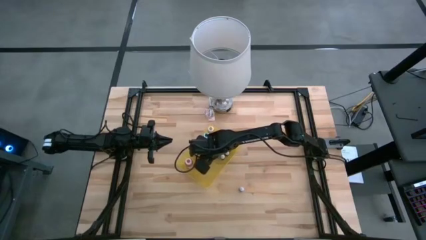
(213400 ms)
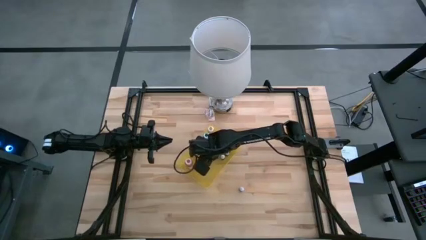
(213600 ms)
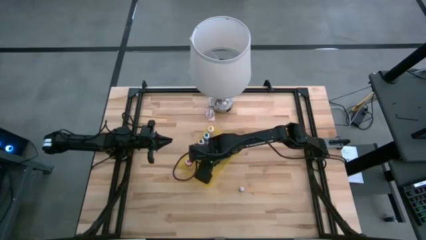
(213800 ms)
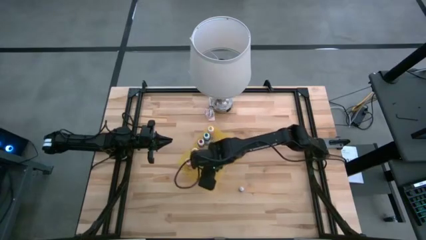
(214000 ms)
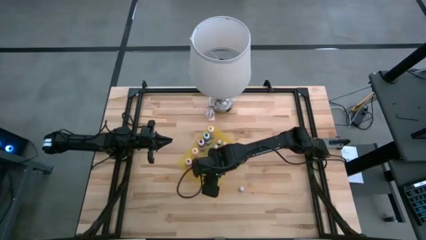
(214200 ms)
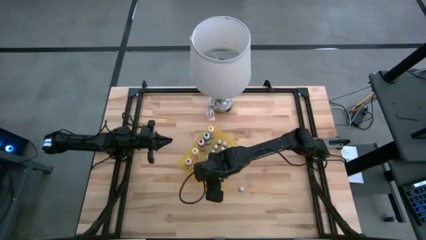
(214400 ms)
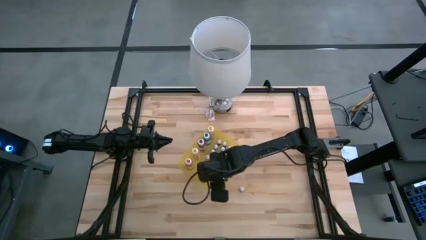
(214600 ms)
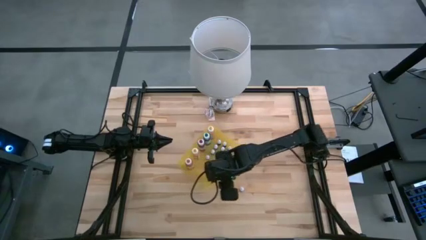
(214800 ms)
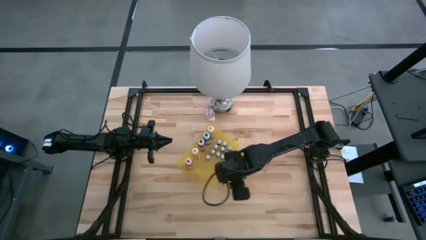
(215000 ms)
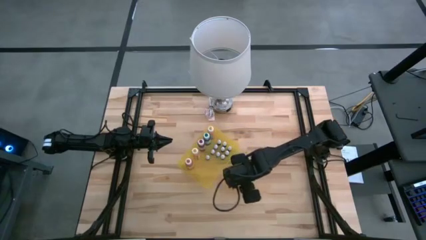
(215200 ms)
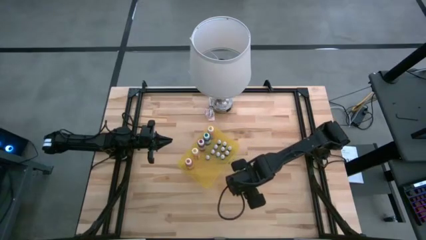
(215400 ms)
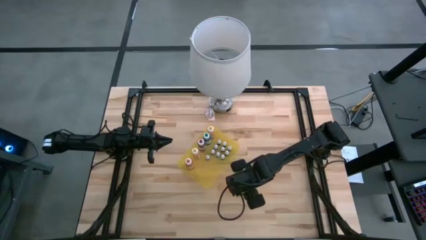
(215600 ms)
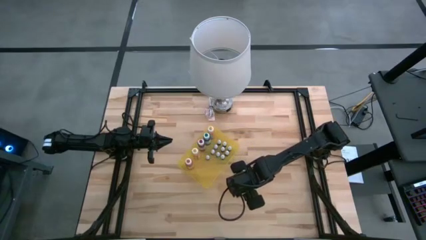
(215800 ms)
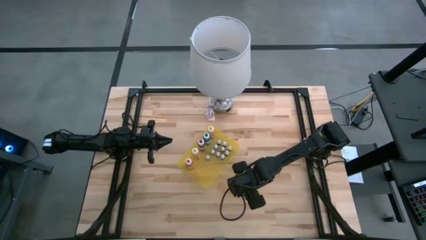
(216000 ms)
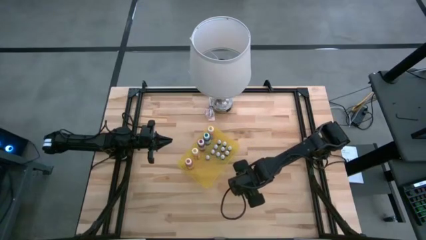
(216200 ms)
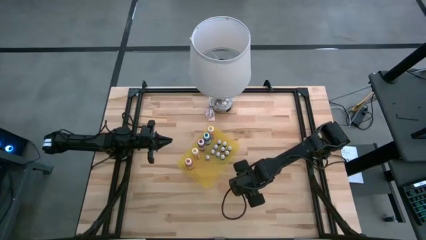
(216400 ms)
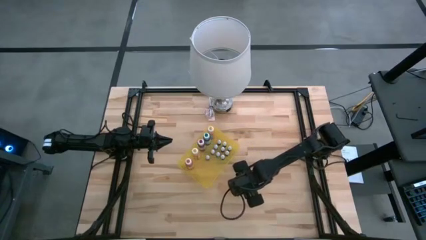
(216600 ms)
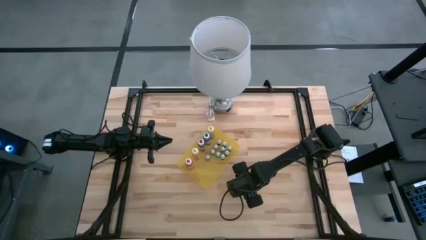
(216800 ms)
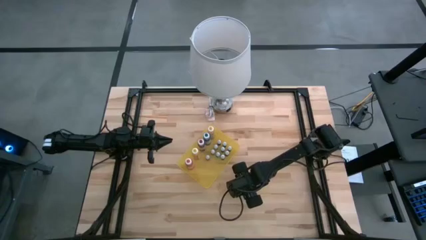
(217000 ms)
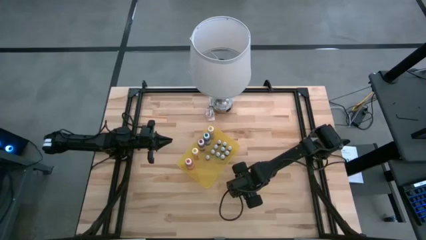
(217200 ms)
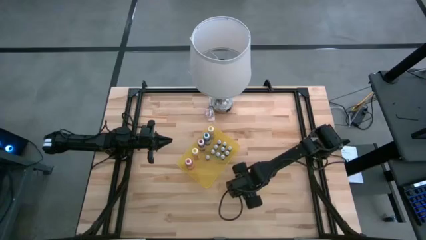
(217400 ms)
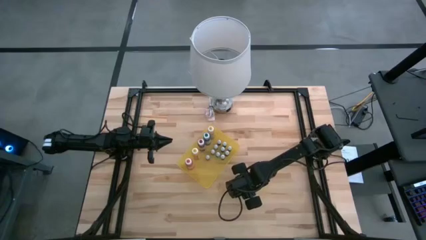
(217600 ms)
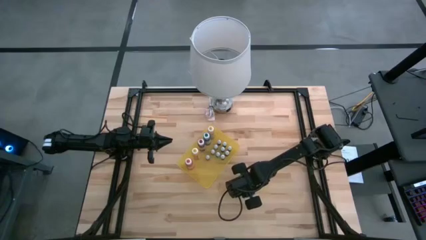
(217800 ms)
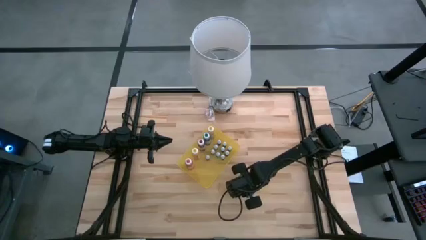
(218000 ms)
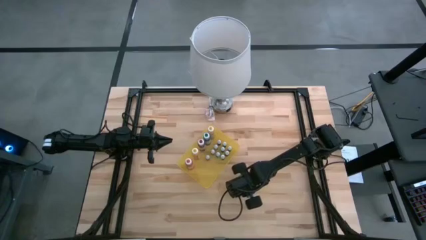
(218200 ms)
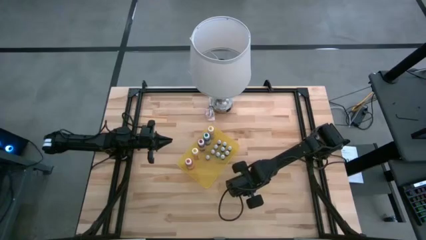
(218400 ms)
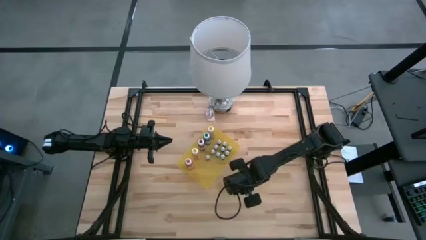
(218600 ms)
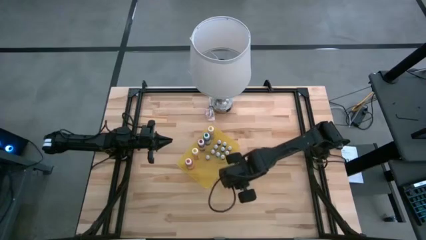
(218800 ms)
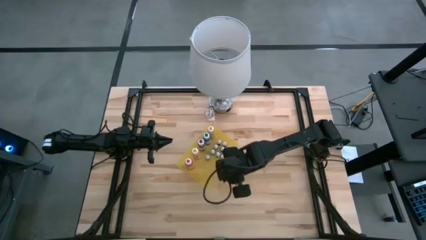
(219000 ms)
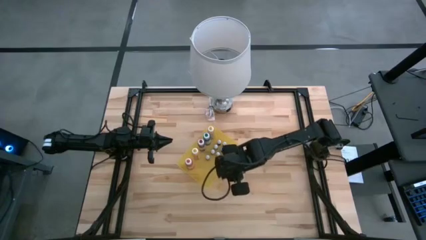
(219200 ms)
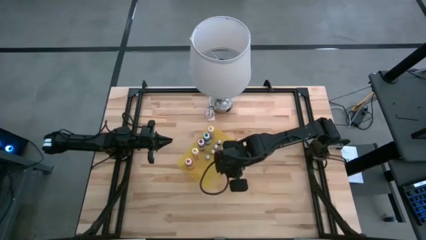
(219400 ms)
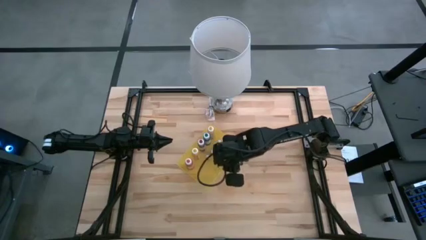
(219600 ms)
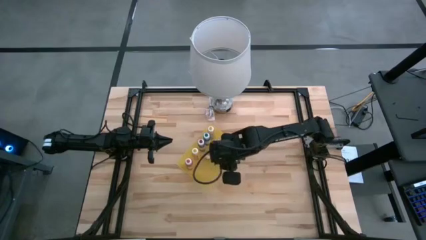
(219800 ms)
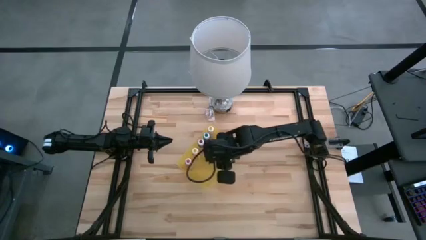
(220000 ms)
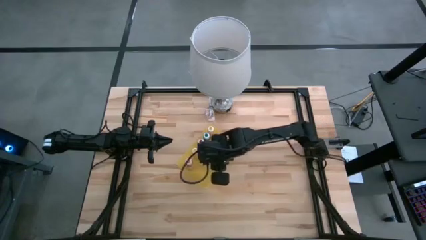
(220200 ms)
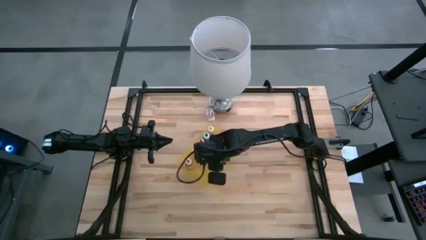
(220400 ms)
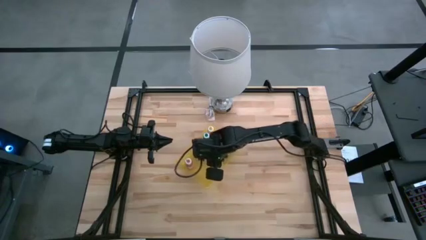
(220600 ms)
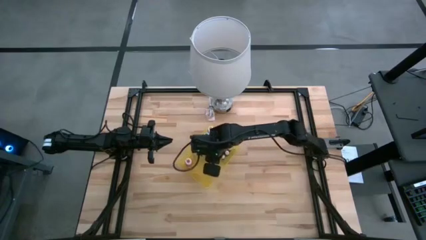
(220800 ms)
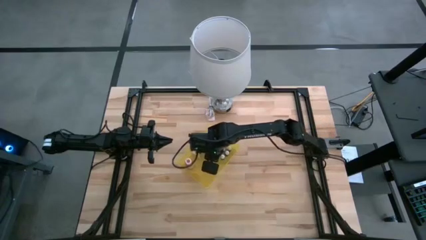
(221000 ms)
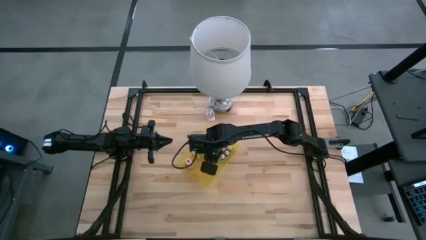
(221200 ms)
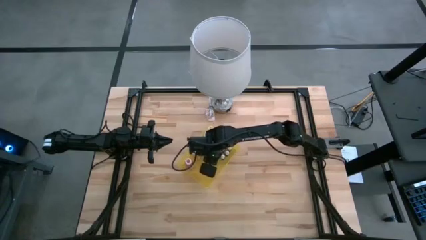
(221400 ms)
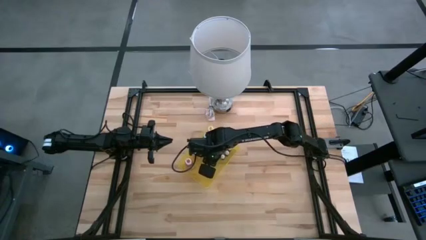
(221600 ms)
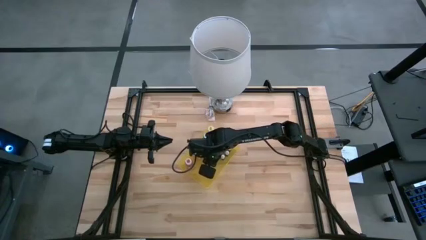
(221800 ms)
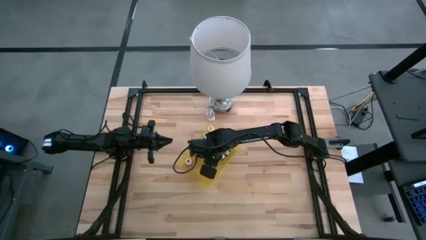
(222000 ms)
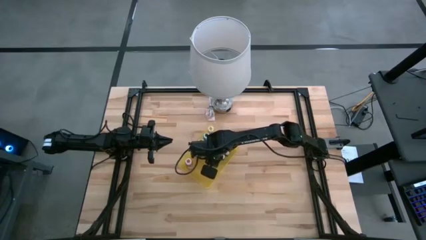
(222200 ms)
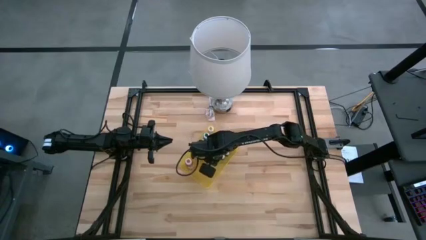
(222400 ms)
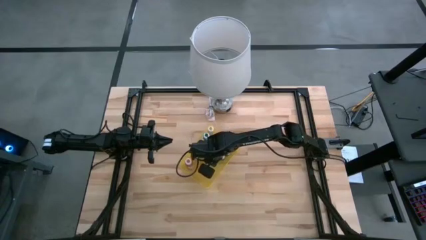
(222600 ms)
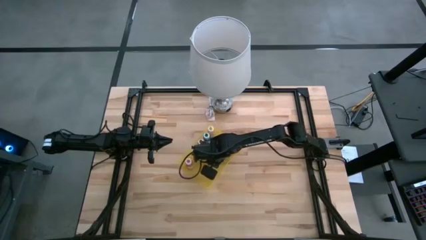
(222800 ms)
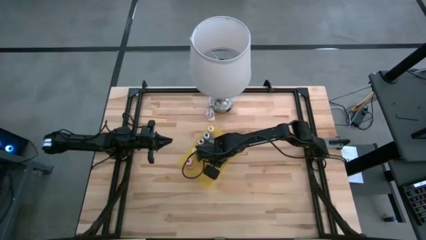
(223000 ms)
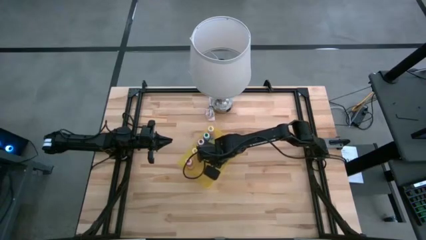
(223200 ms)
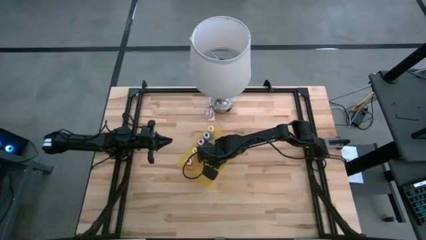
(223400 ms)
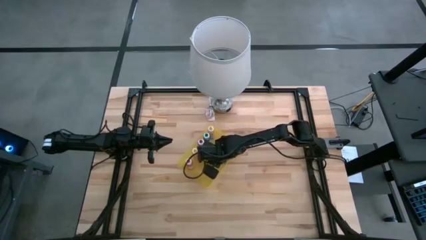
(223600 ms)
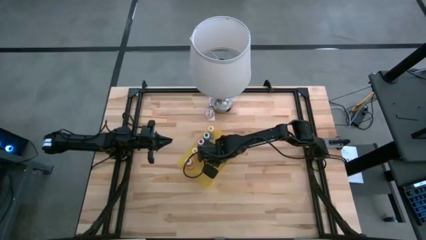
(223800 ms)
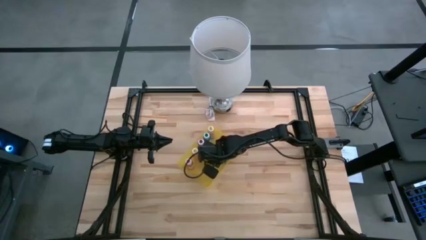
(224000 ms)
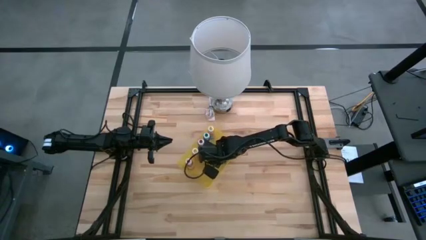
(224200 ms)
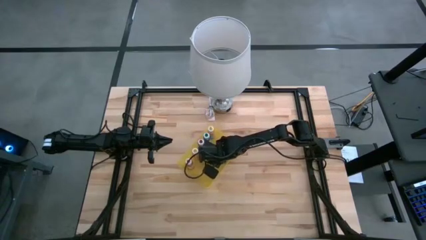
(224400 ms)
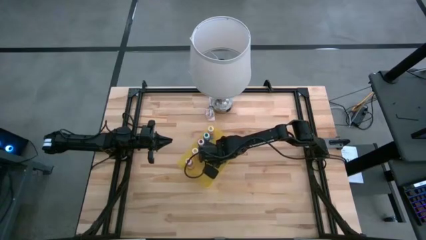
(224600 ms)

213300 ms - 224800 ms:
Task: Pick & Place food coloring
Put the small red food coloring bottle into the yellow bin

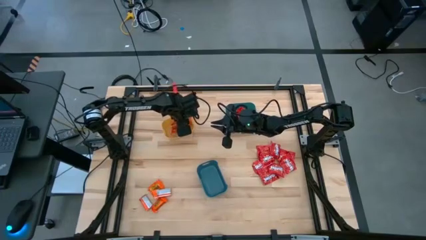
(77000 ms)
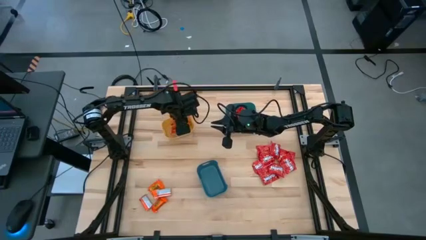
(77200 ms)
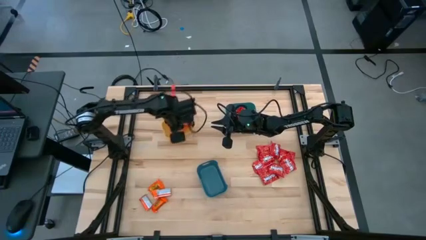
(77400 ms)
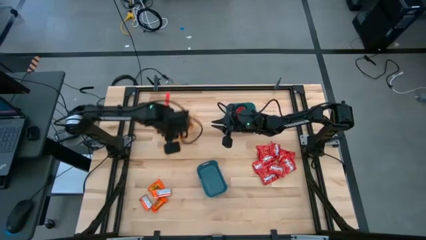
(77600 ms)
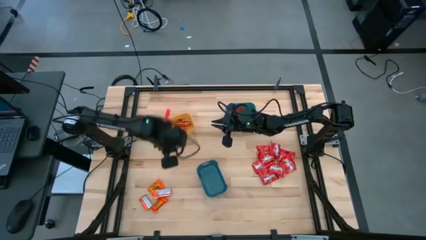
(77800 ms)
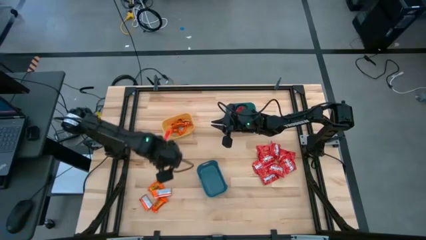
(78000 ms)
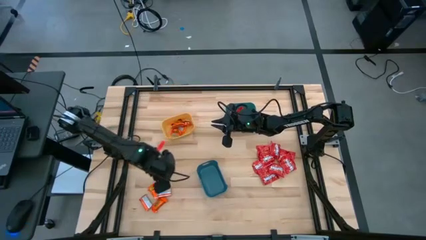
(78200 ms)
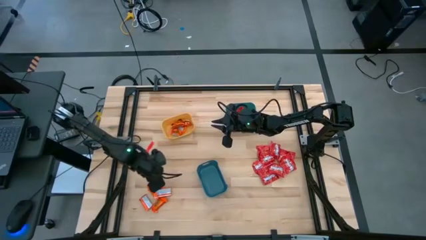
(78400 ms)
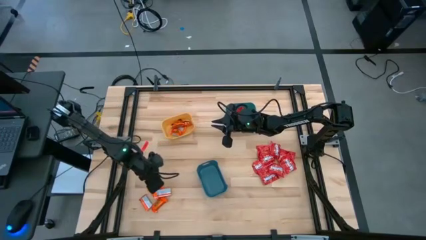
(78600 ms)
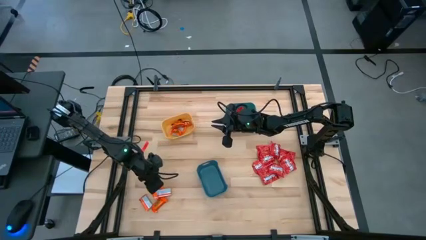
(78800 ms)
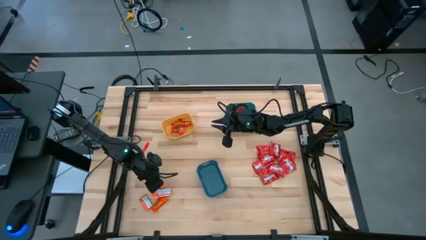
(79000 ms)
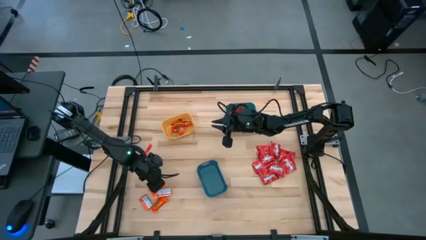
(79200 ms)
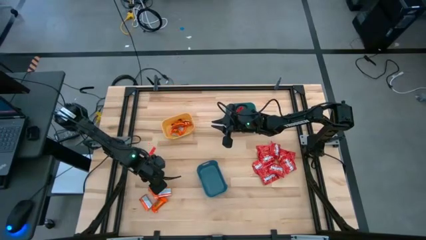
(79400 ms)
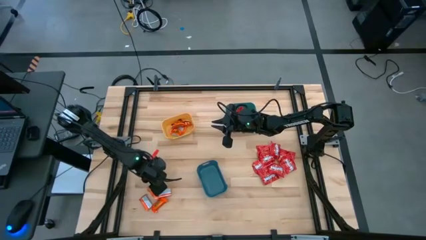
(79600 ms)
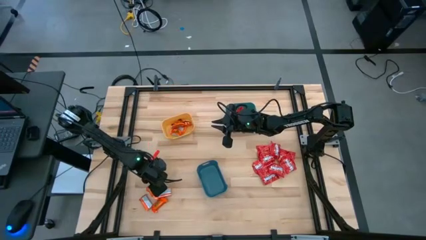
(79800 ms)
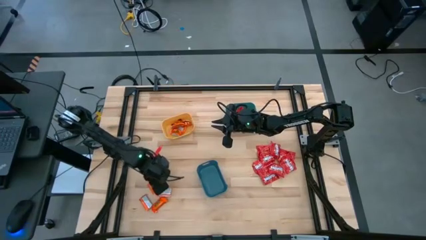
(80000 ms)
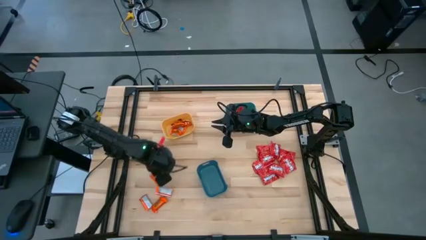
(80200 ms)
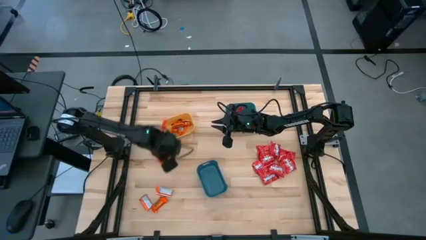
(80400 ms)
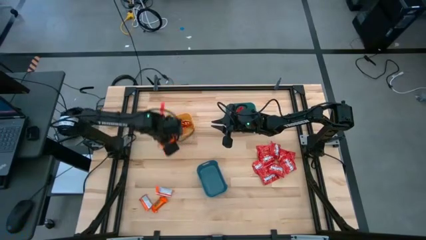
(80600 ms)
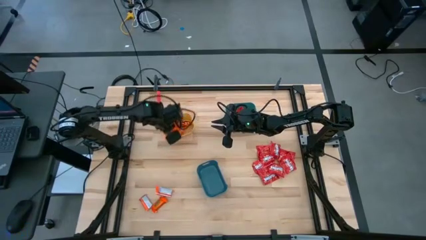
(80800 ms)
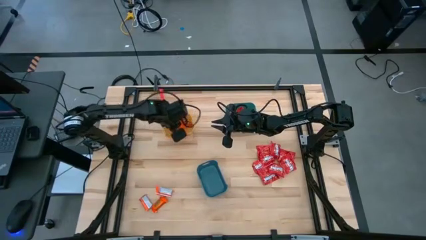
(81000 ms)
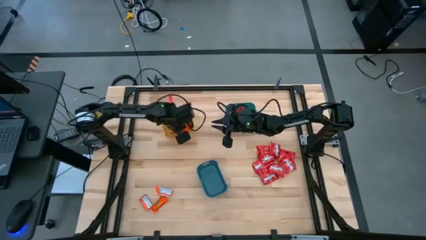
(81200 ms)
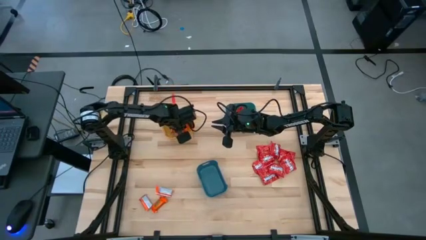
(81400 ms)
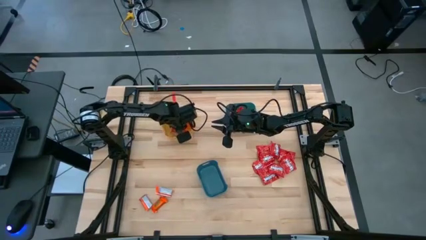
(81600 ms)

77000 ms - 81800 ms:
Task: Sort candy
Put the orange chocolate bar into the yellow bin
